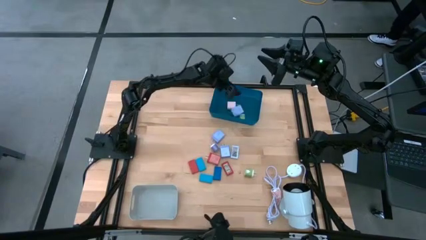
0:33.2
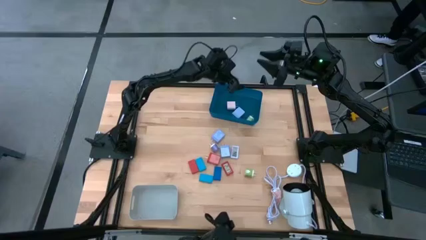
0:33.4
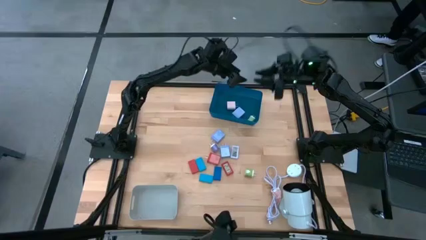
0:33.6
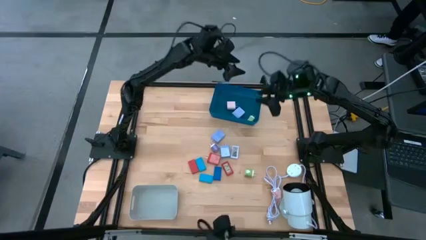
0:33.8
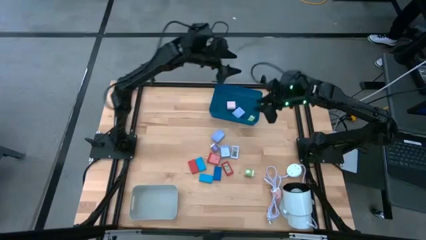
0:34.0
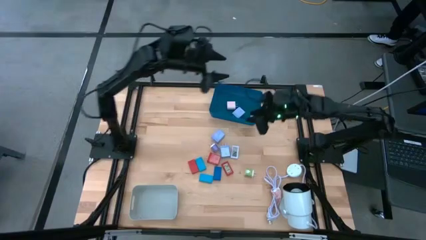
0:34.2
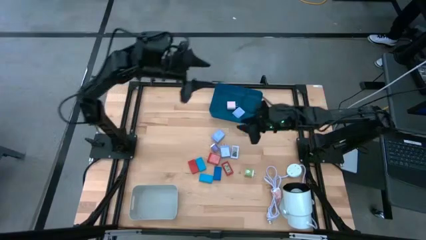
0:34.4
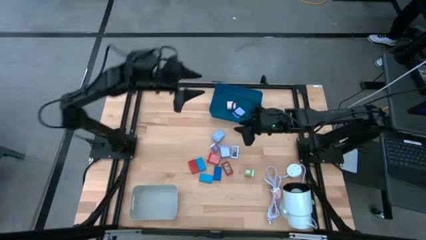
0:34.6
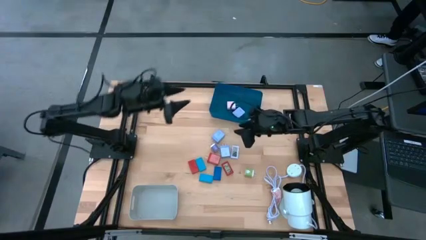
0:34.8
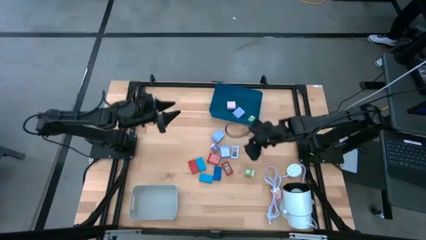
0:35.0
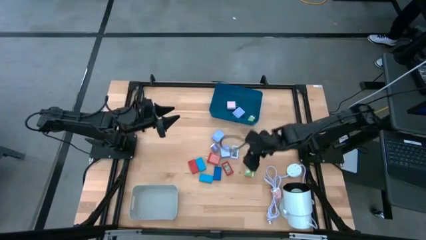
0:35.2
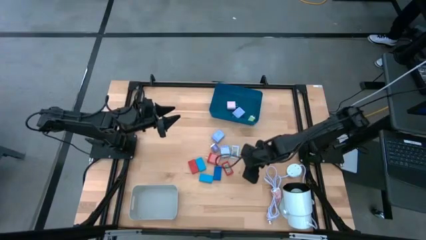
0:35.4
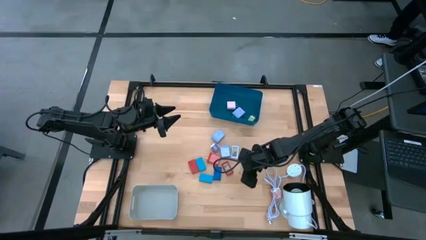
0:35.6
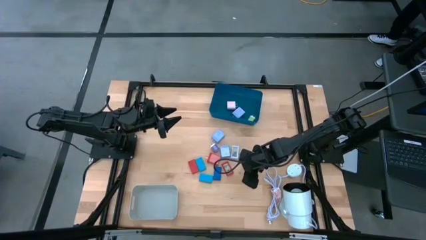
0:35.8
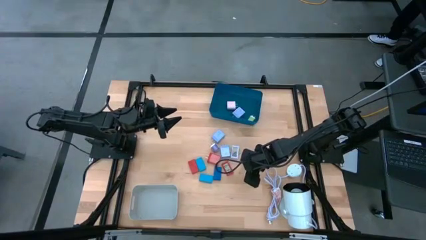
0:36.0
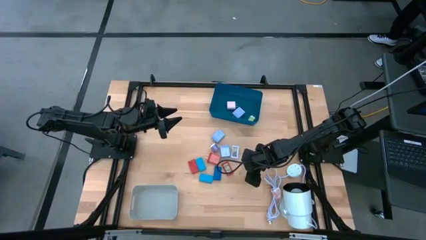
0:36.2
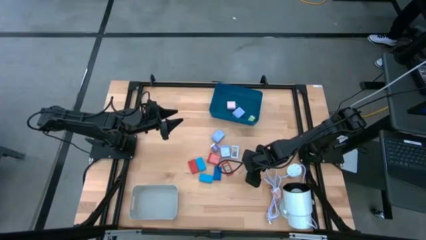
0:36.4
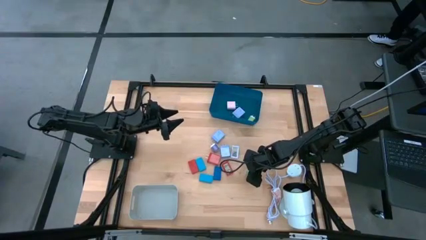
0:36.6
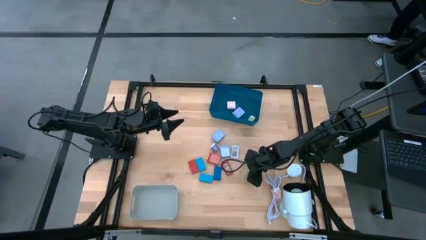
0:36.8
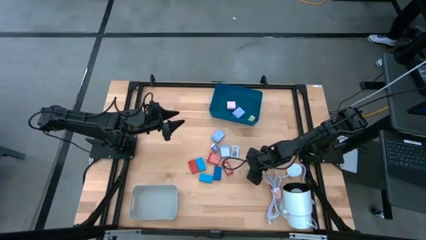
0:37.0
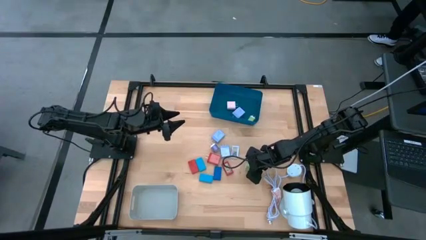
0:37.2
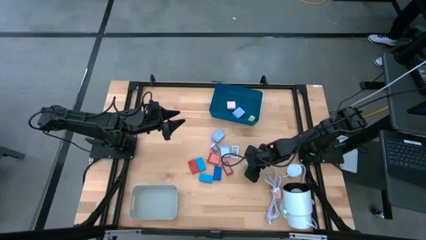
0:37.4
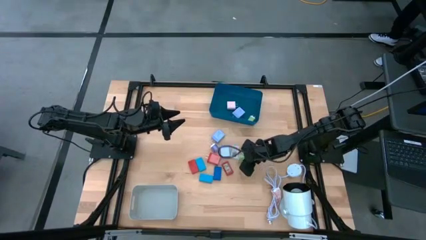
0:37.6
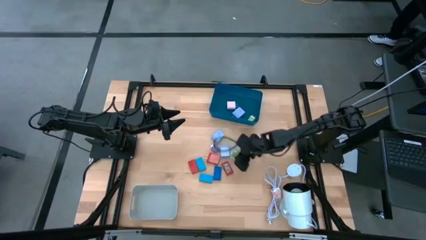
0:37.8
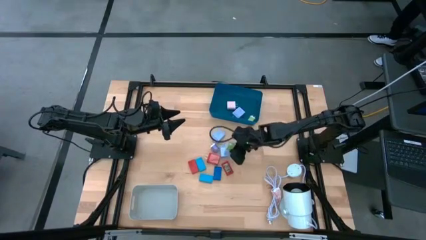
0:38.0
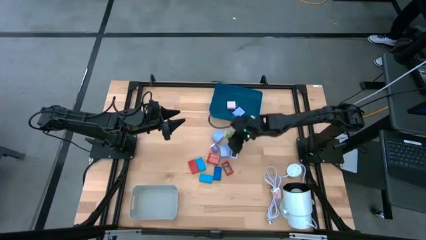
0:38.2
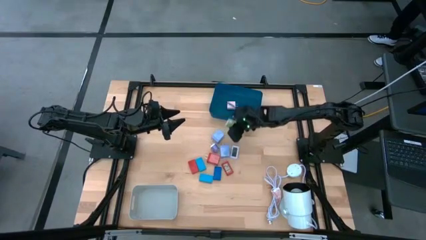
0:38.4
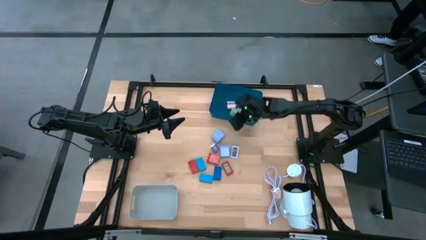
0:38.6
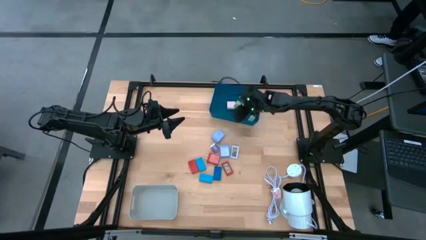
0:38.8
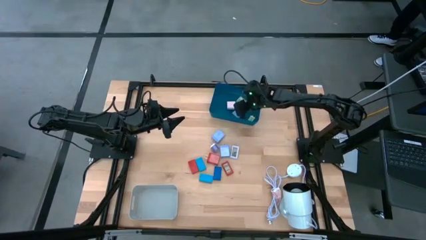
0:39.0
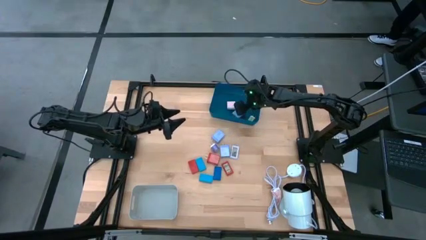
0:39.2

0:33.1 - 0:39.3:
Task: Pick & Place Office items
Put the green charger adapter into the blue bin

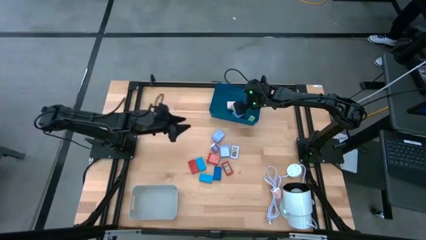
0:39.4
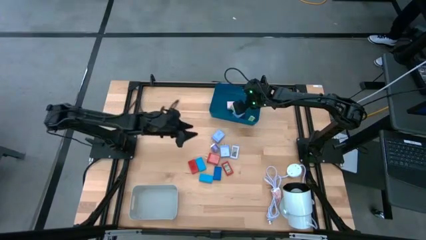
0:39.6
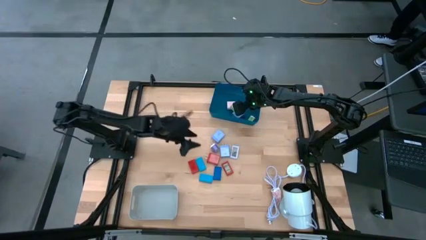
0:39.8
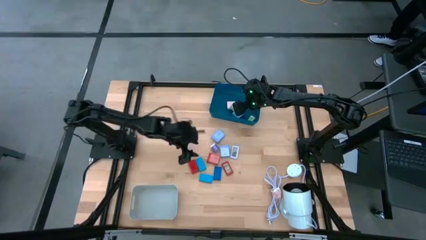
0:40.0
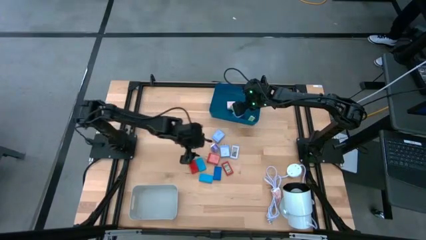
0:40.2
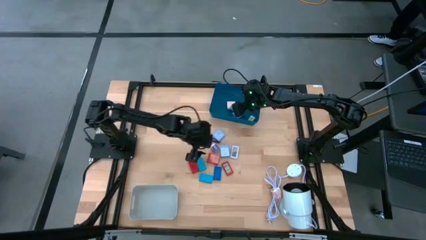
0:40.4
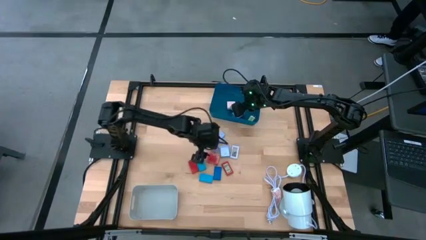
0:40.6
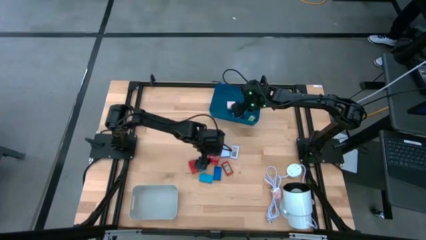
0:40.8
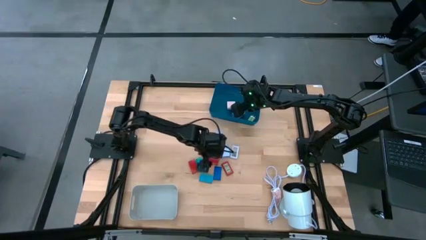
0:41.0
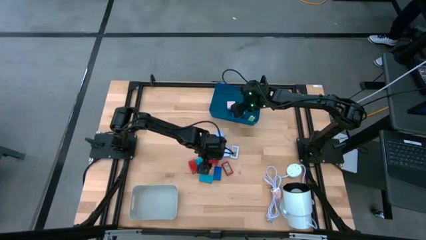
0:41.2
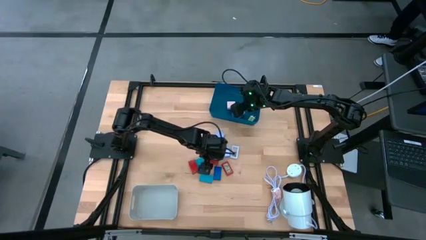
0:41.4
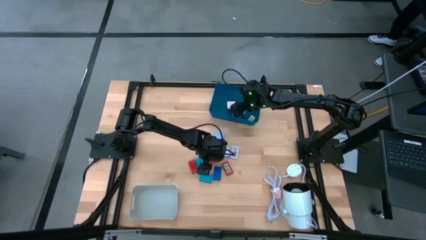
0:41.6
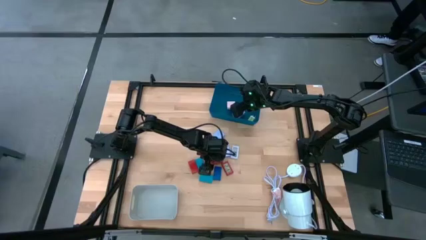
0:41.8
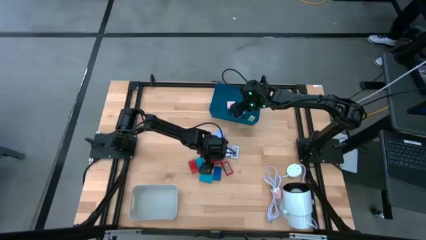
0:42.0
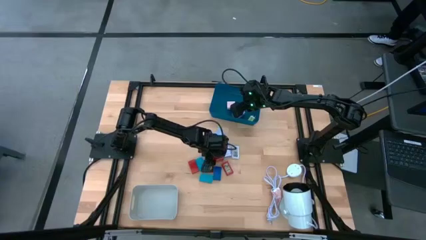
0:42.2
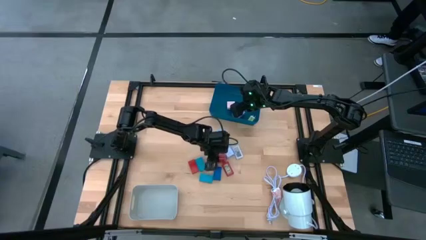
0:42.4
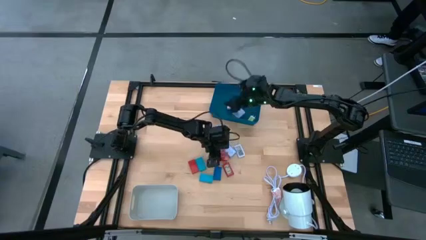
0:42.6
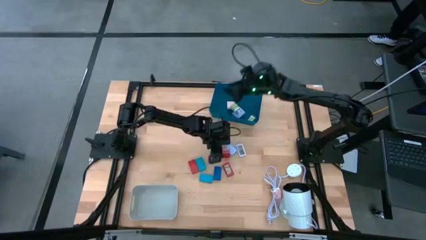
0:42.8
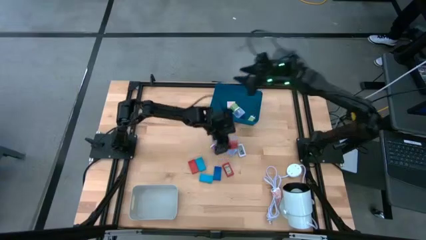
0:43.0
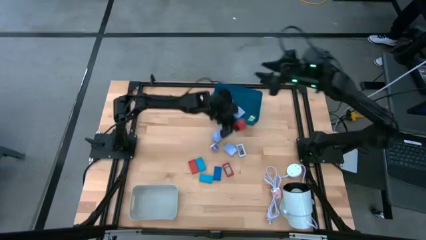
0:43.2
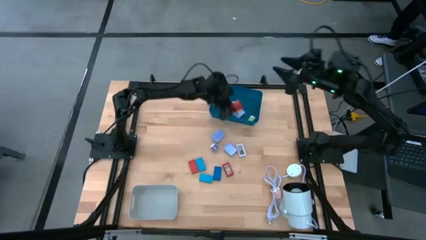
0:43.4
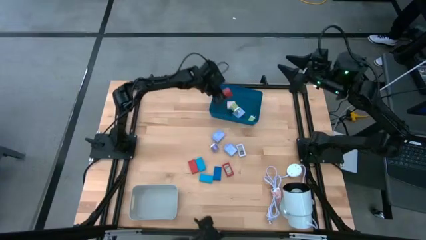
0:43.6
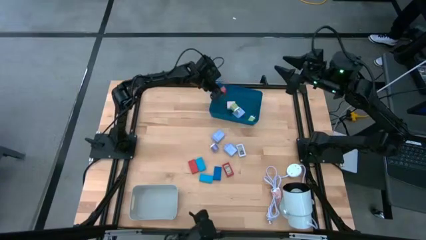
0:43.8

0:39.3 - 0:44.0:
Put the red charger adapter into the blue bin

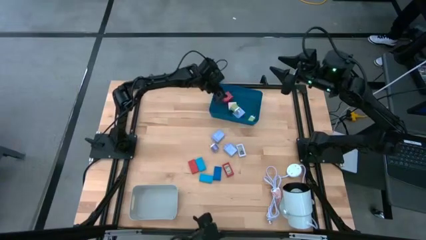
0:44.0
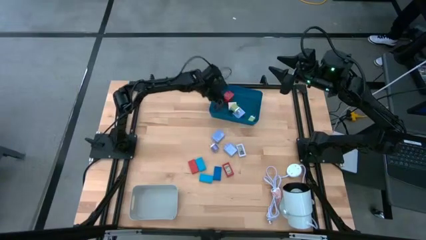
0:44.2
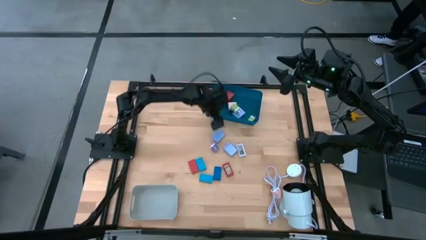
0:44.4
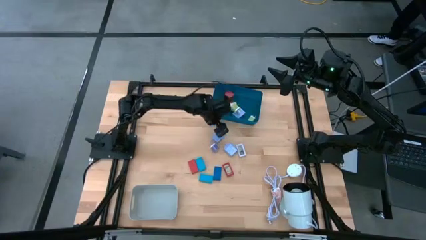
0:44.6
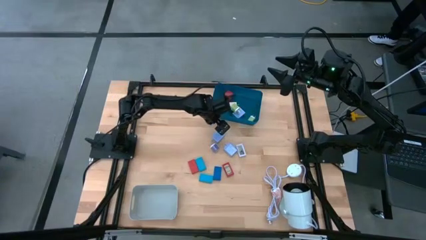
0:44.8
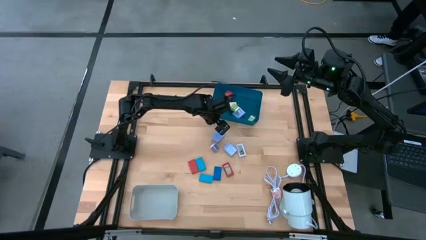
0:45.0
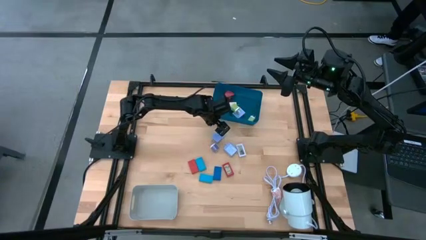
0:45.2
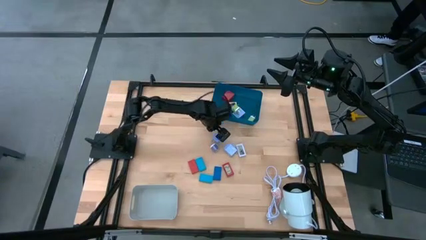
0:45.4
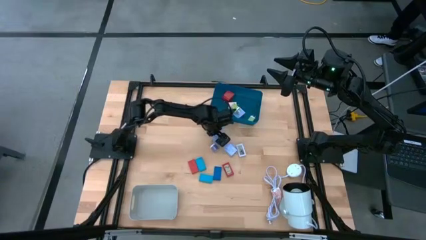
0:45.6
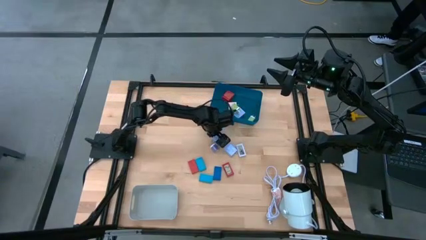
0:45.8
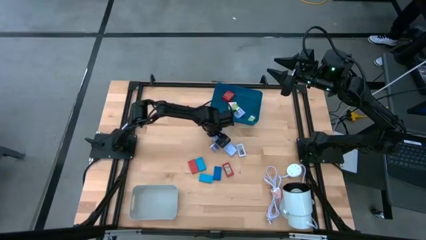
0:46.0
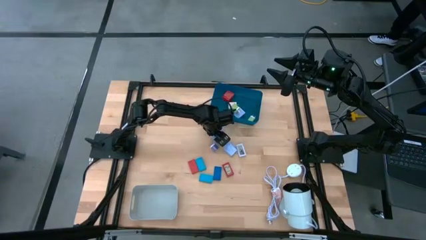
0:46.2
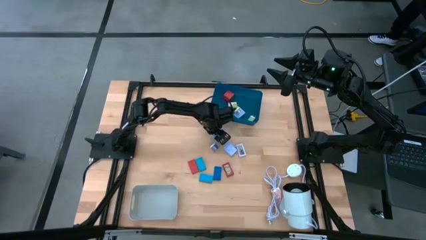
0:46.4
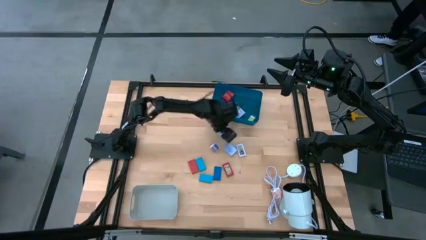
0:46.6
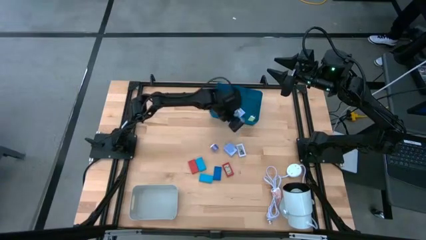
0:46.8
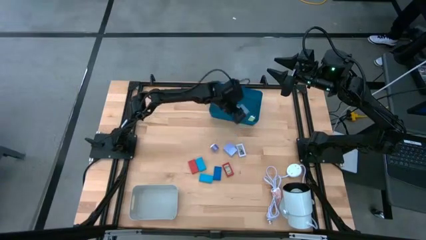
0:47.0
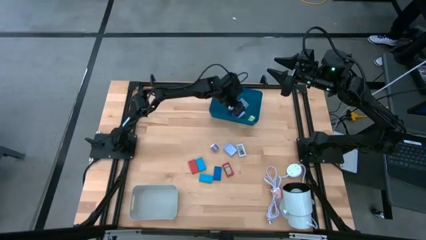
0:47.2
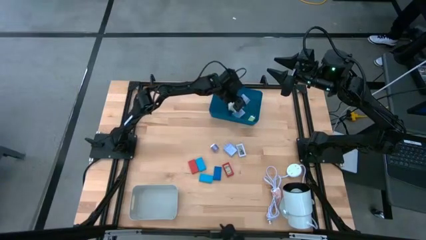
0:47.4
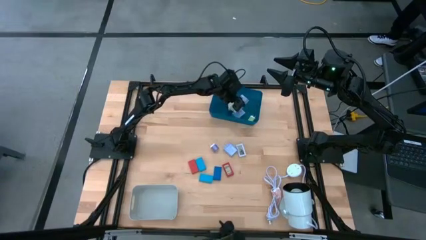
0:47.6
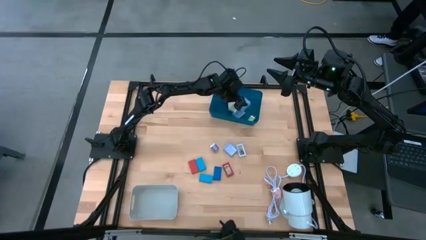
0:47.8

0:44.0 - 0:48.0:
Put the top light blue charger adapter into the blue bin

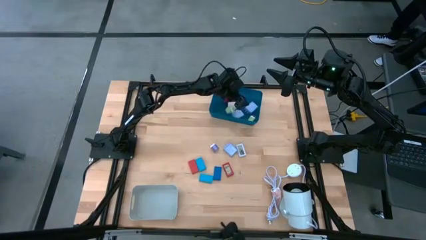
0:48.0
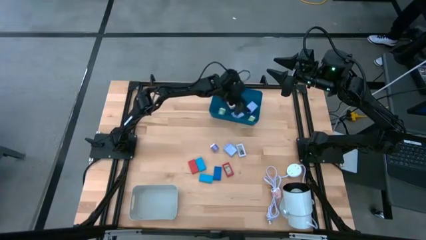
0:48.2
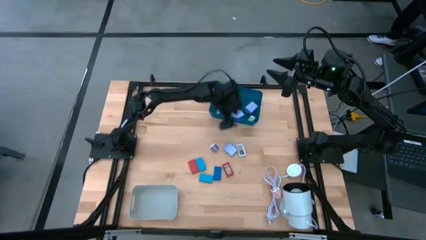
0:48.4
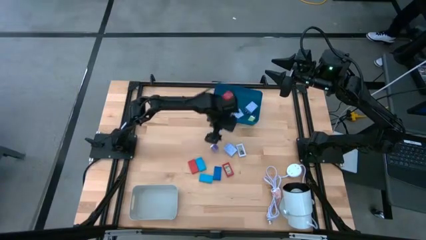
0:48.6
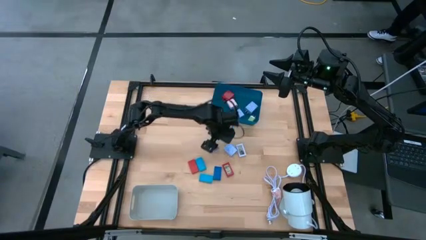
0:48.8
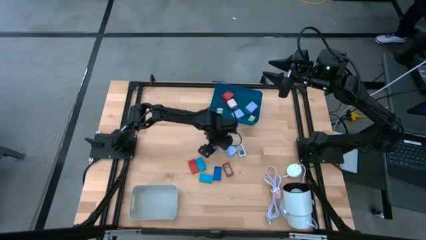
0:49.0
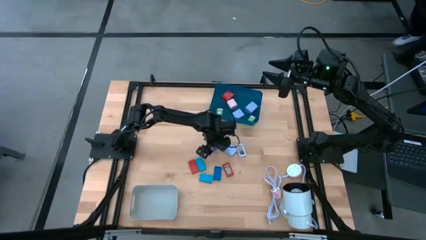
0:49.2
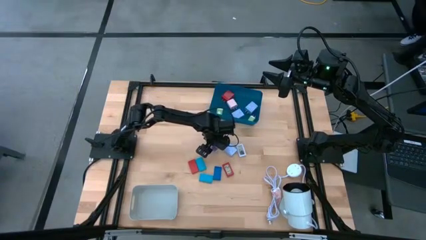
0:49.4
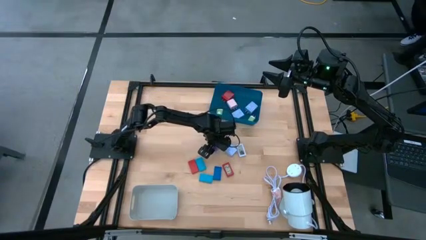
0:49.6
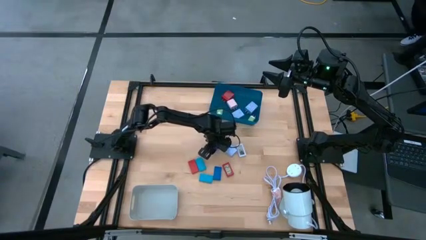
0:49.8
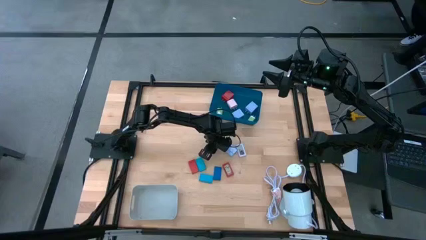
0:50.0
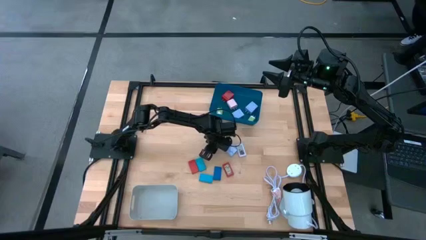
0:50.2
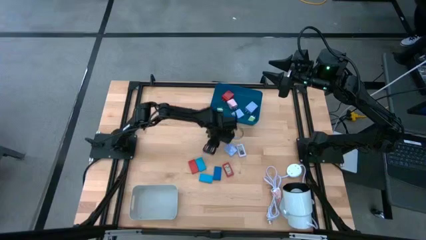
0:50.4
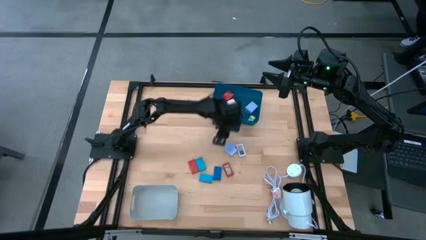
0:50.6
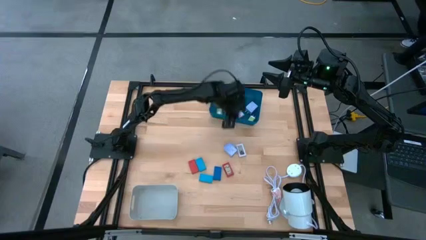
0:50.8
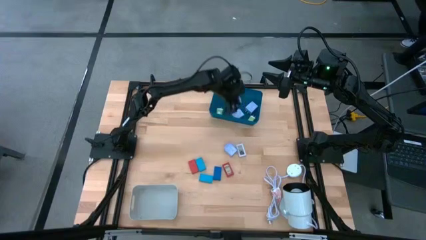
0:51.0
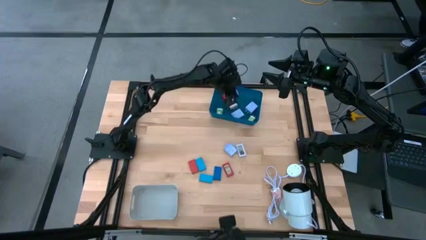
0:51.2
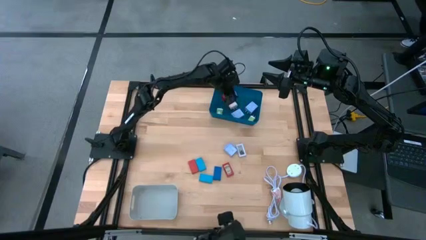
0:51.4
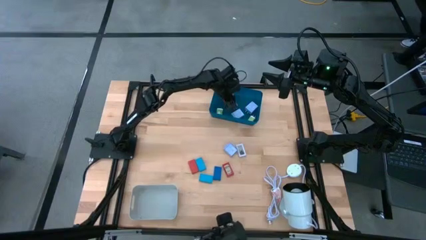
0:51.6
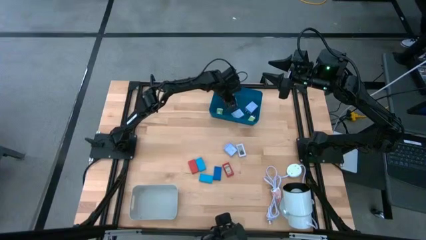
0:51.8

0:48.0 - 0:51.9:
Put the purple charger adapter into the blue bin
